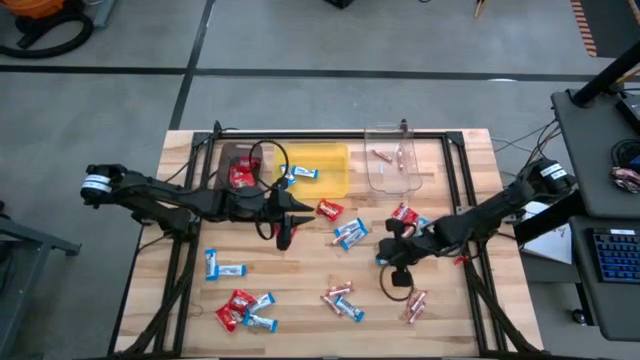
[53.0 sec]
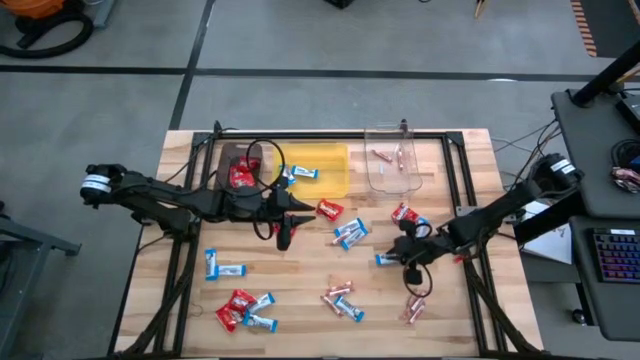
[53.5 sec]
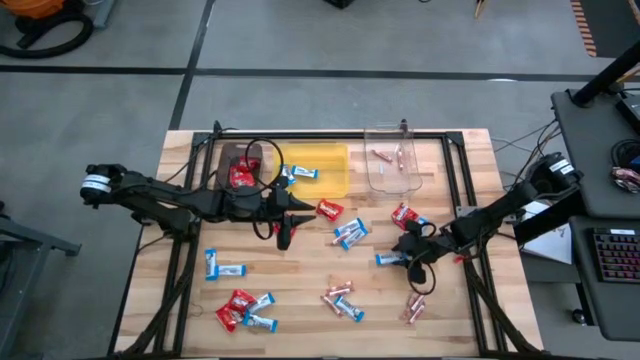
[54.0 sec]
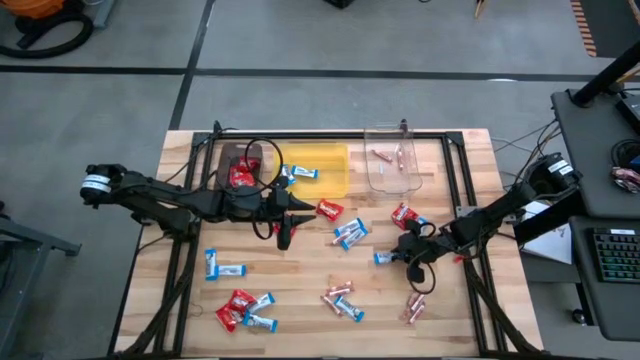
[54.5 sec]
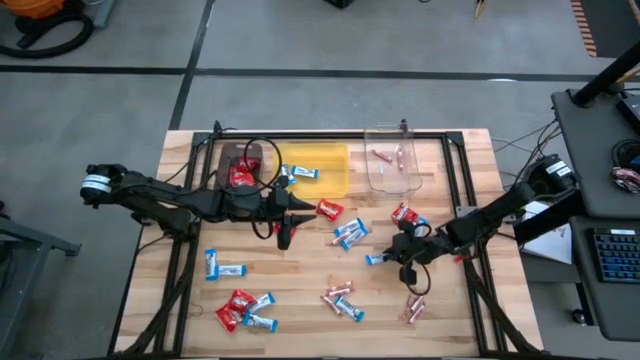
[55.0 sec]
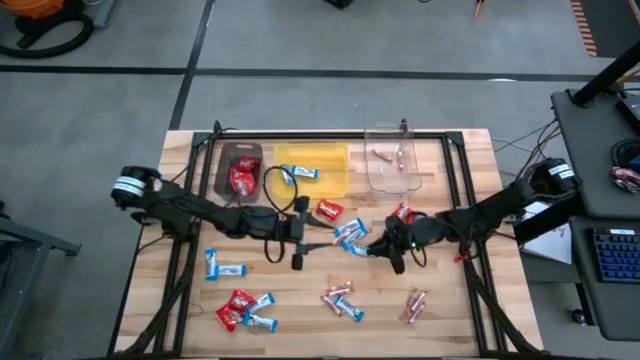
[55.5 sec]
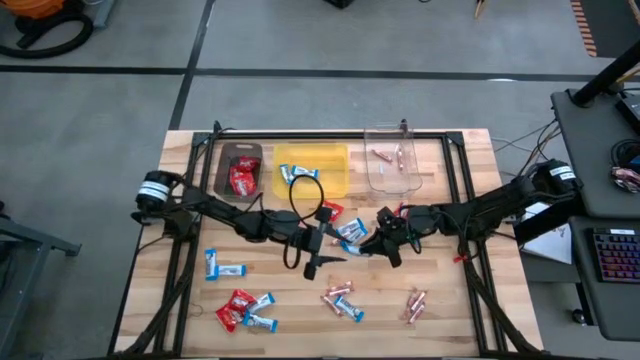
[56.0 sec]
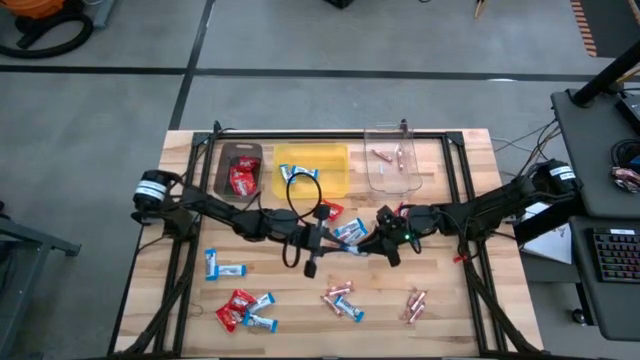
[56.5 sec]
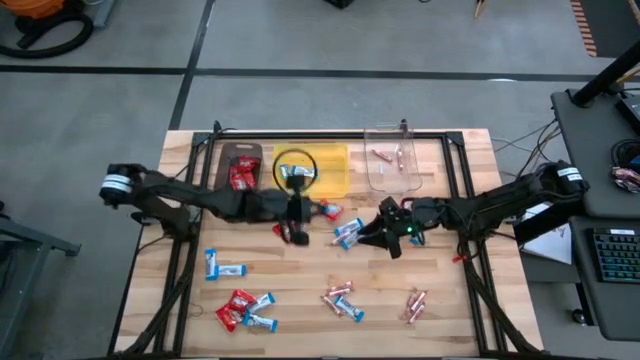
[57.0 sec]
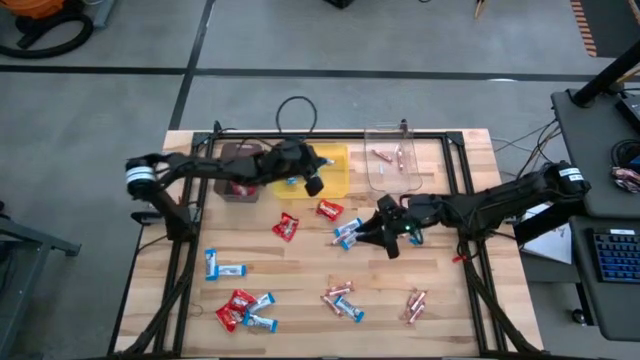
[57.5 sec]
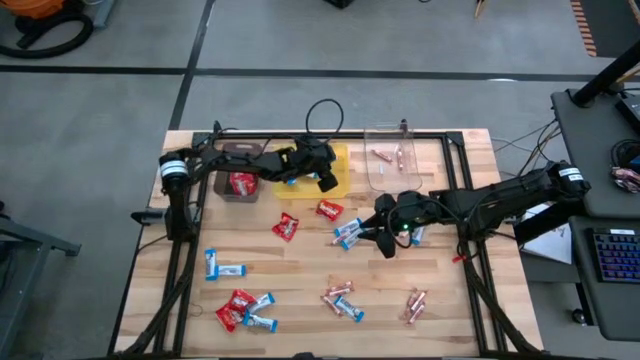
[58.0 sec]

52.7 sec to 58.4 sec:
Task: Sort candy
Put the white candy into the yellow bin

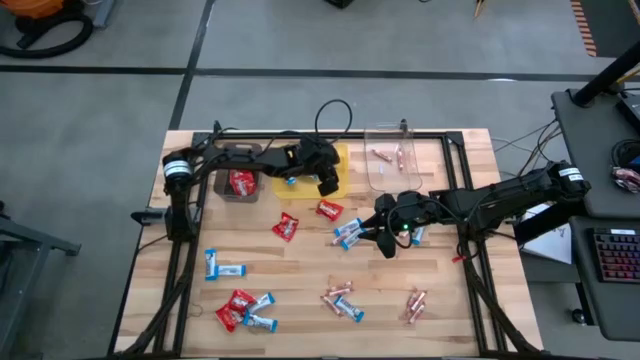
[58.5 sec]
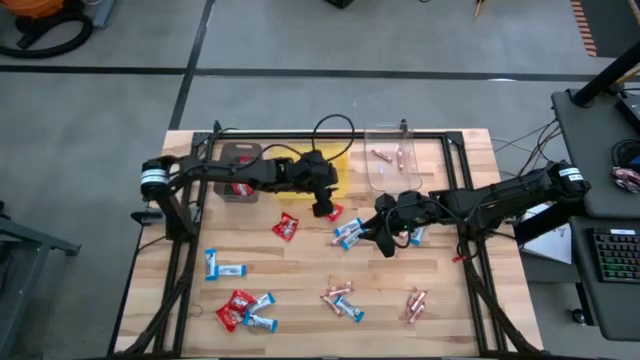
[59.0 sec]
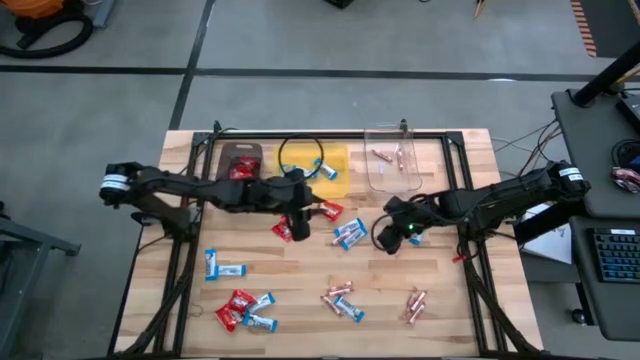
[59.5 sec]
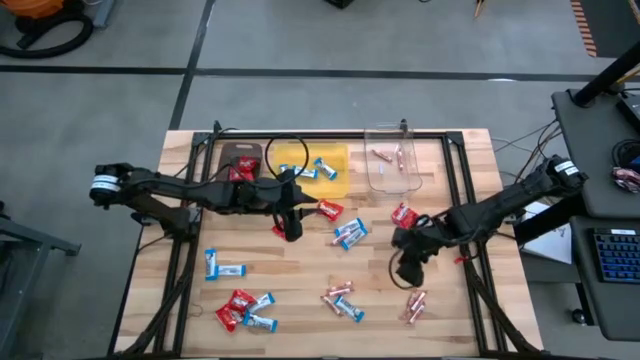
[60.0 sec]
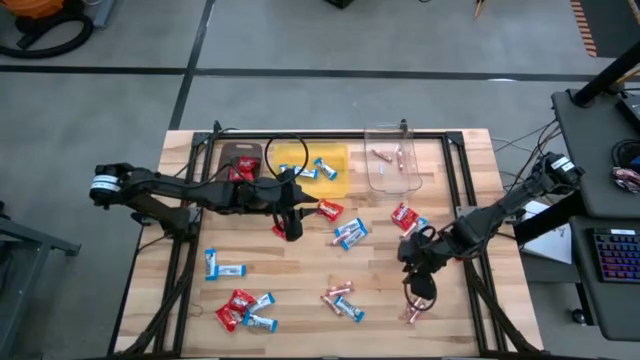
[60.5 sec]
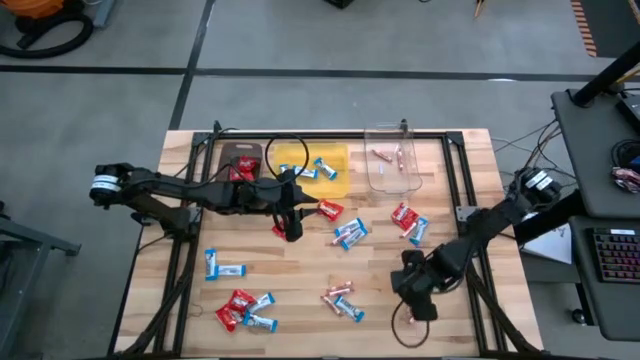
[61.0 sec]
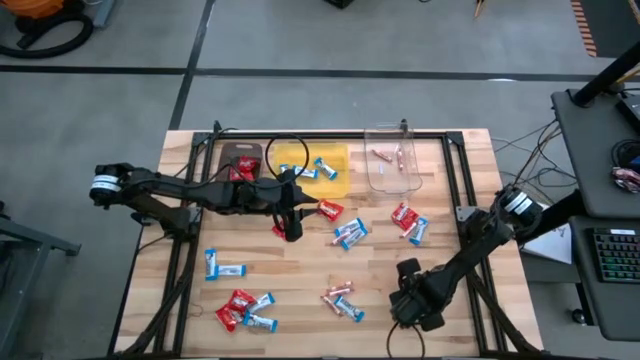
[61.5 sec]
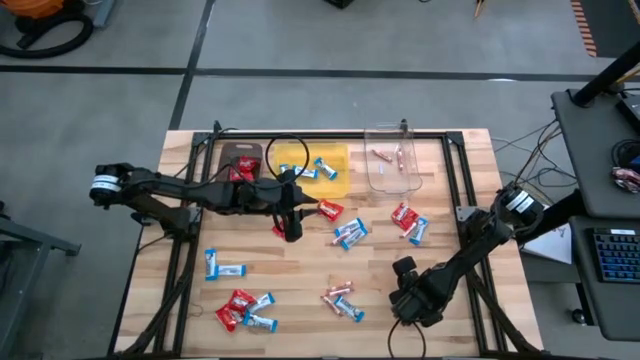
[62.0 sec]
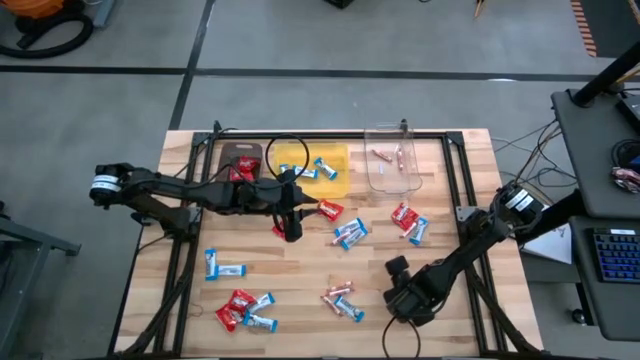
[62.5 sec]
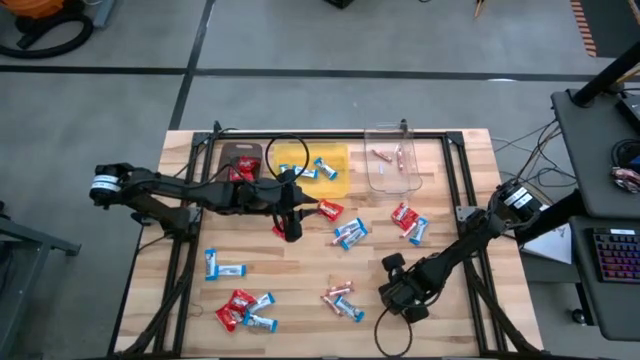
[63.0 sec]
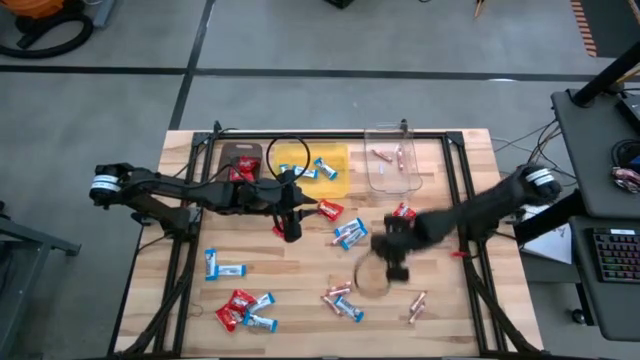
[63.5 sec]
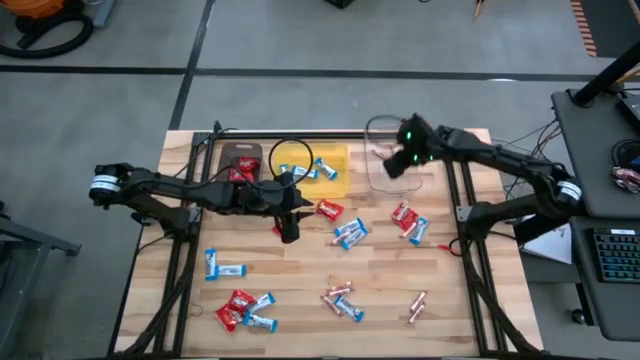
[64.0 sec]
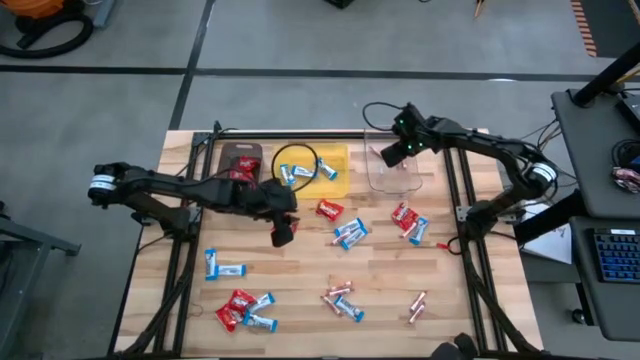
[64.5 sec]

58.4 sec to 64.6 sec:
Put the orange candy into the transparent bin

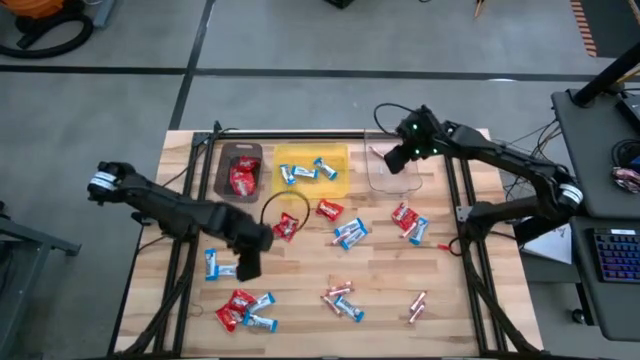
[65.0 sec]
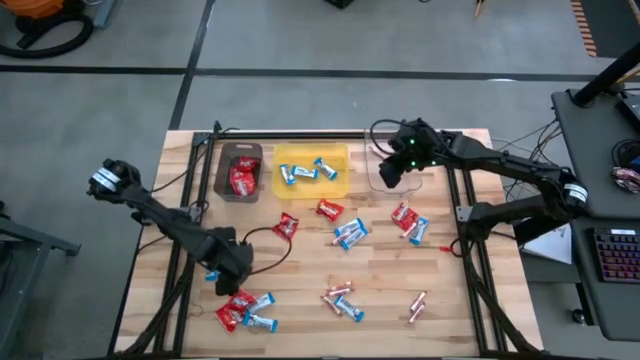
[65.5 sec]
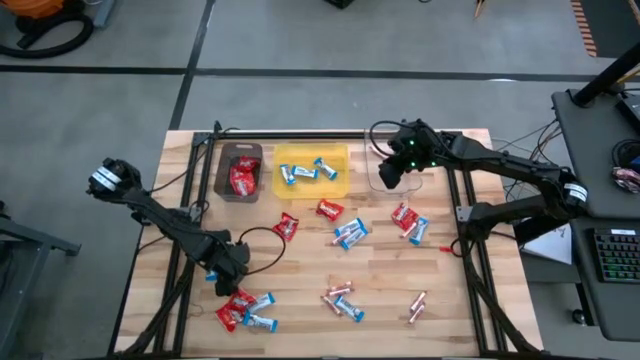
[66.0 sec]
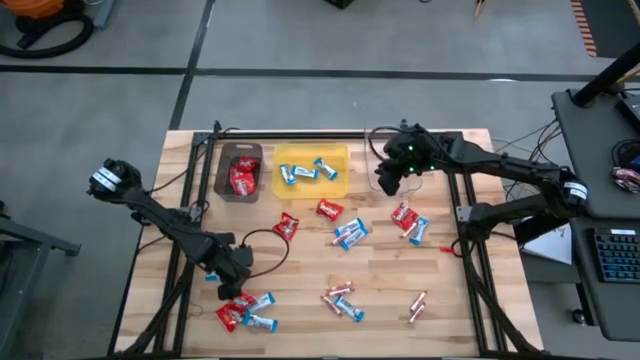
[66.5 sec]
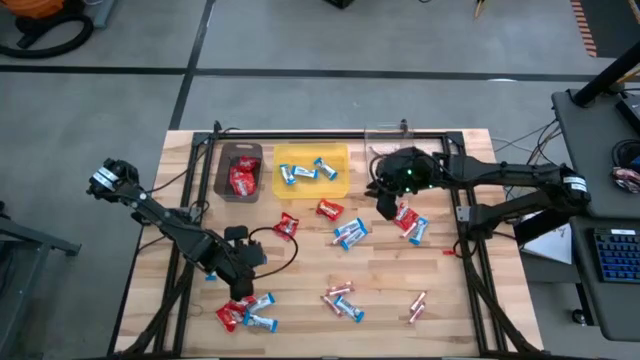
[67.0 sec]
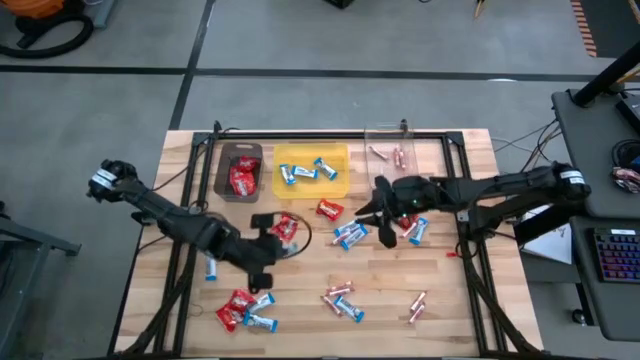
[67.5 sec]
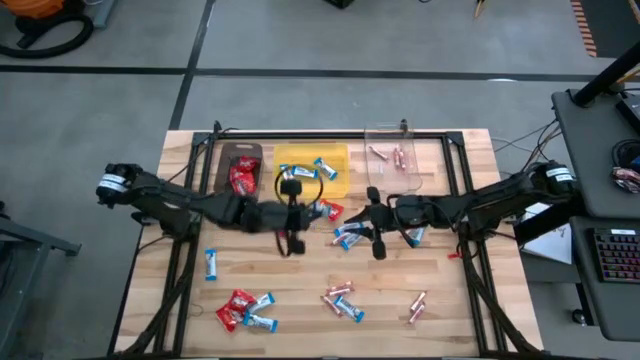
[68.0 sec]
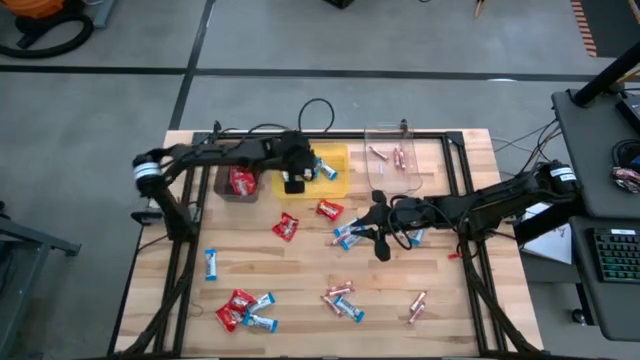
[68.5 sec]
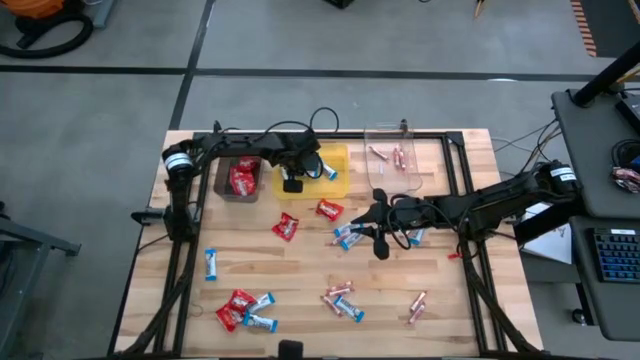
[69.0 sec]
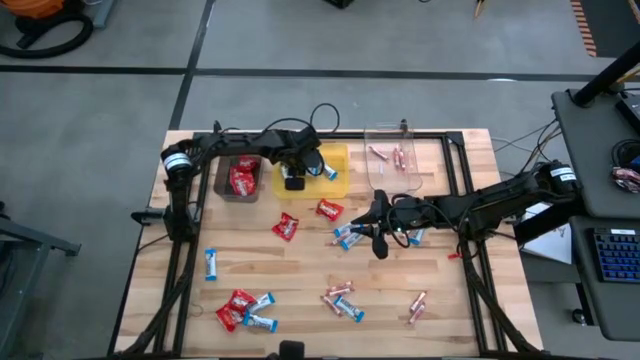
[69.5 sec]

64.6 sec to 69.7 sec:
Put the white candy into the yellow bin

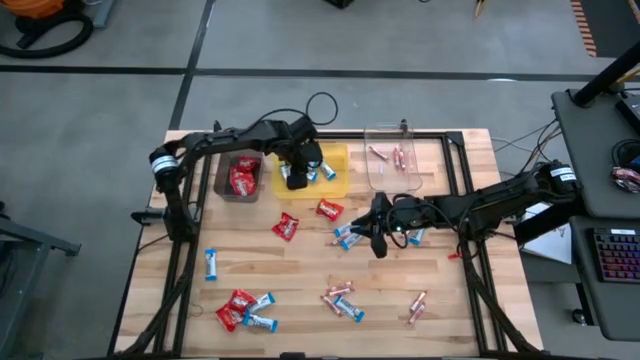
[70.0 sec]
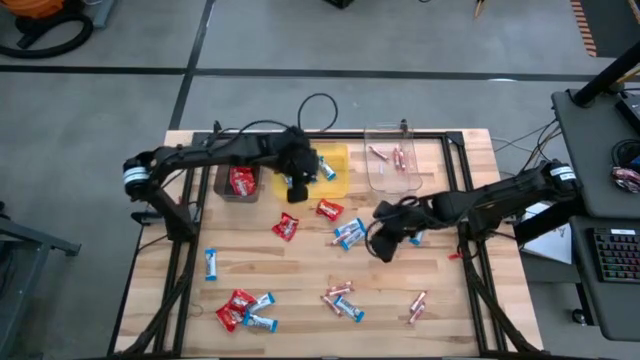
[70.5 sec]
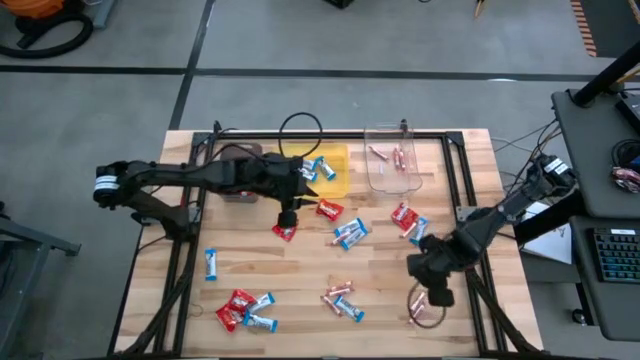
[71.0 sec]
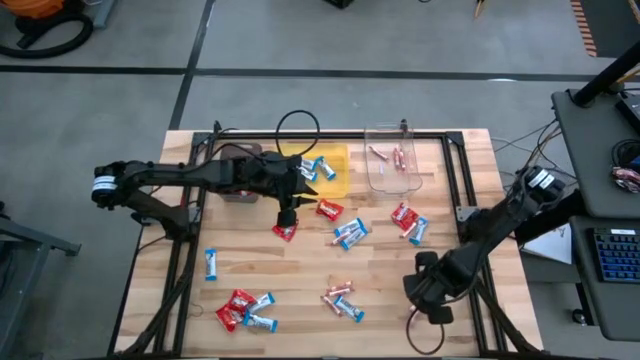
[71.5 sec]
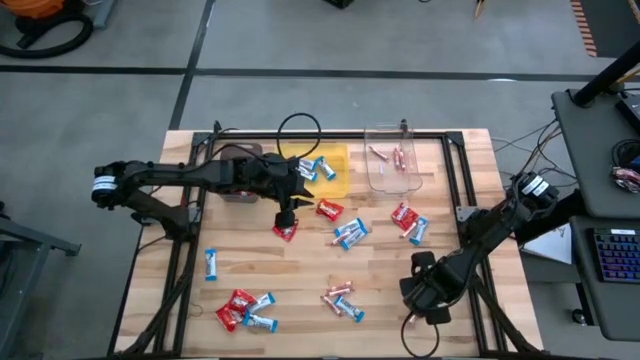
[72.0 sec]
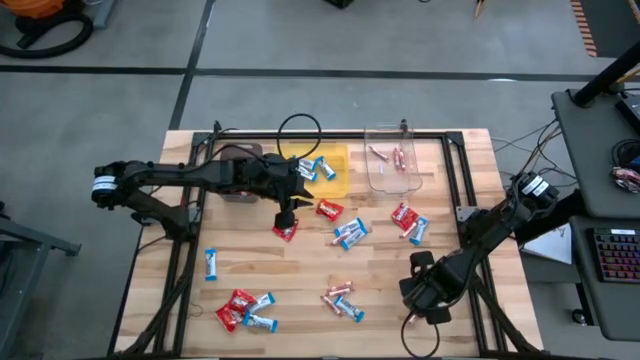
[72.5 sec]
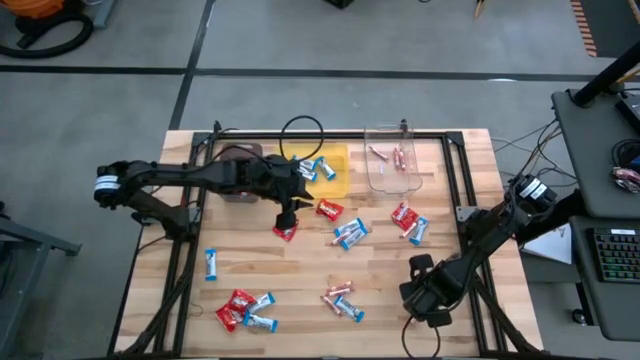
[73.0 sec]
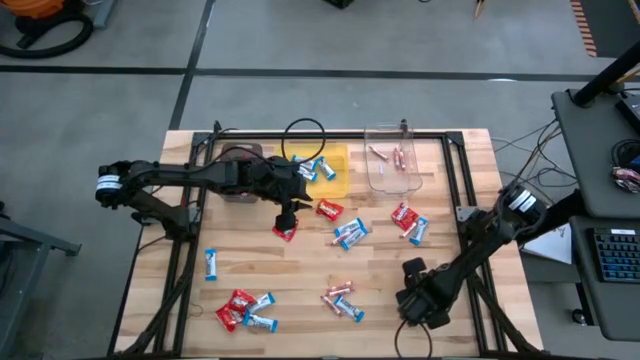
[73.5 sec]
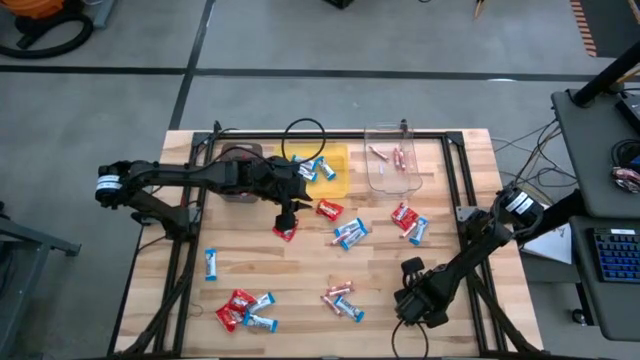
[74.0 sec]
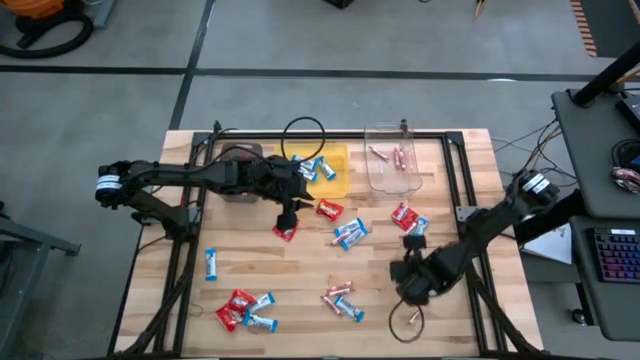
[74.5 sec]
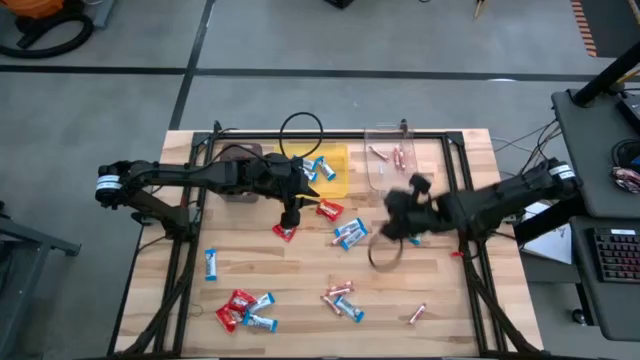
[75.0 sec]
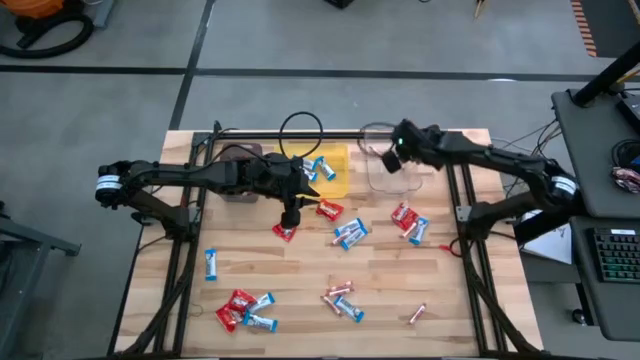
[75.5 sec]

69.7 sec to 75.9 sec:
Put the orange candy into the transparent bin
